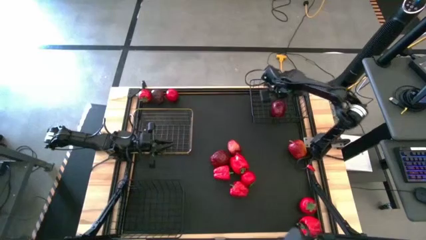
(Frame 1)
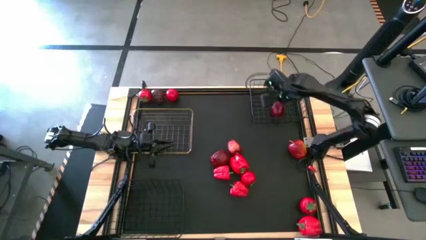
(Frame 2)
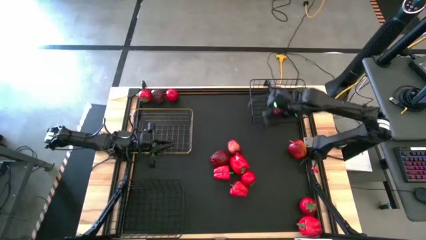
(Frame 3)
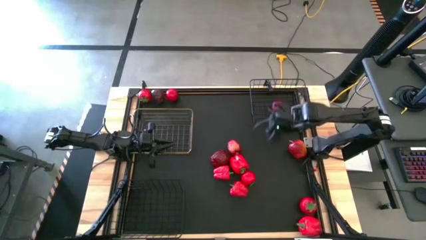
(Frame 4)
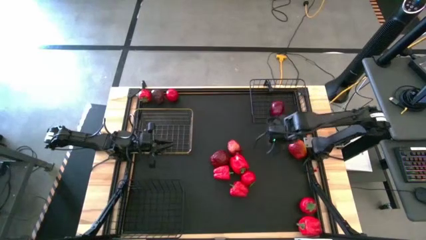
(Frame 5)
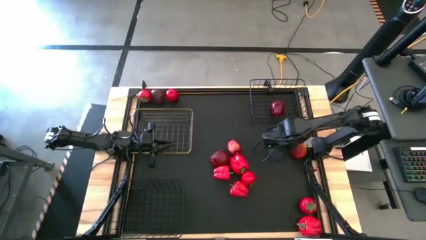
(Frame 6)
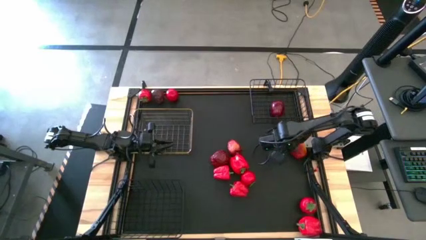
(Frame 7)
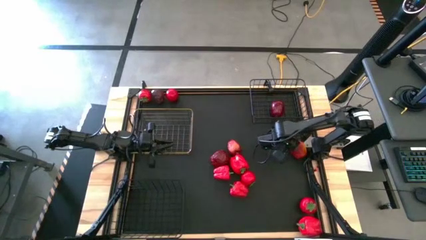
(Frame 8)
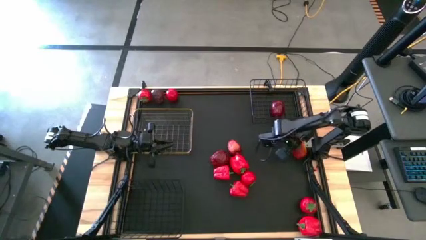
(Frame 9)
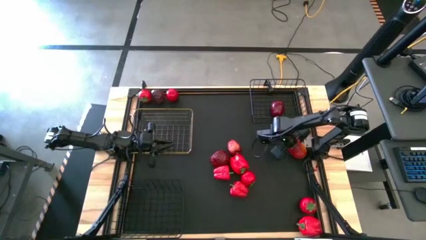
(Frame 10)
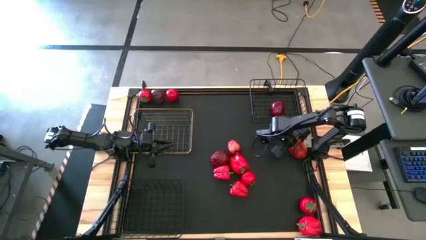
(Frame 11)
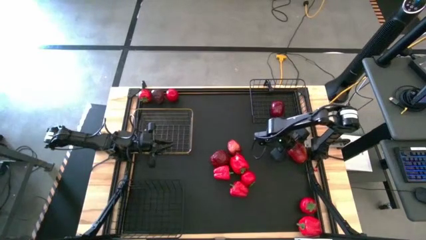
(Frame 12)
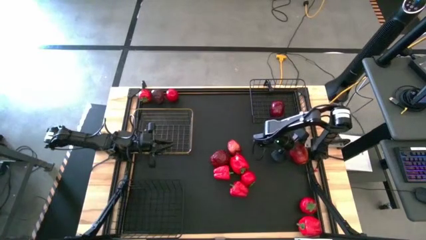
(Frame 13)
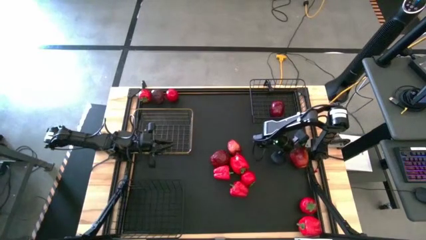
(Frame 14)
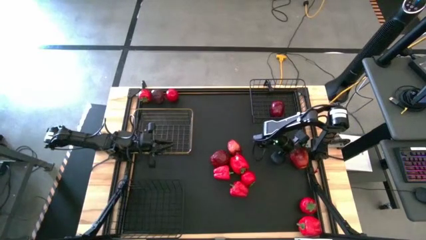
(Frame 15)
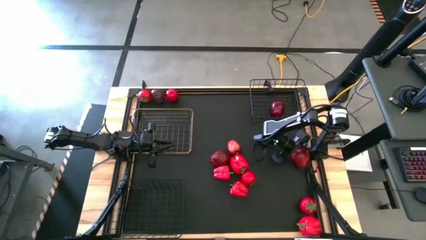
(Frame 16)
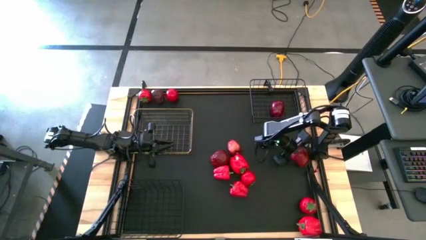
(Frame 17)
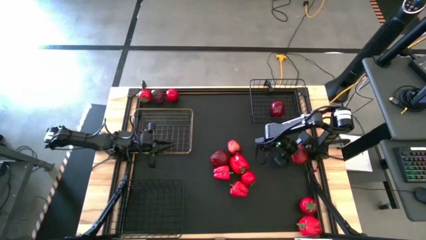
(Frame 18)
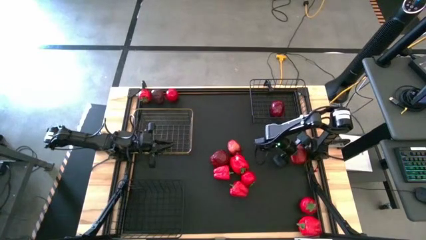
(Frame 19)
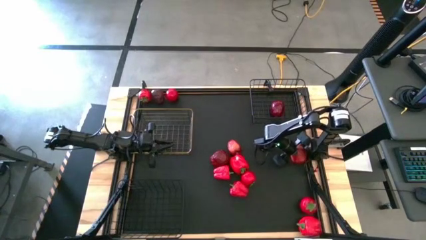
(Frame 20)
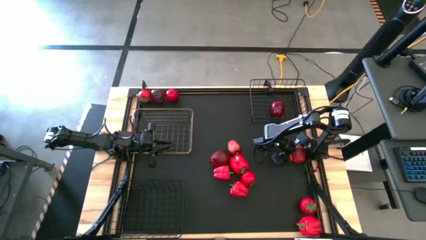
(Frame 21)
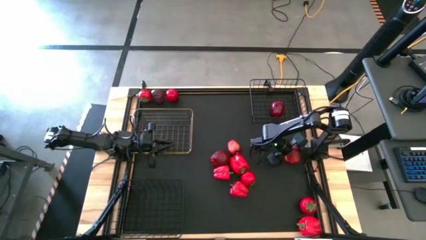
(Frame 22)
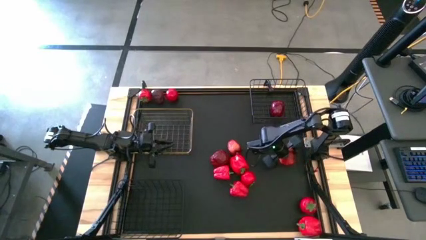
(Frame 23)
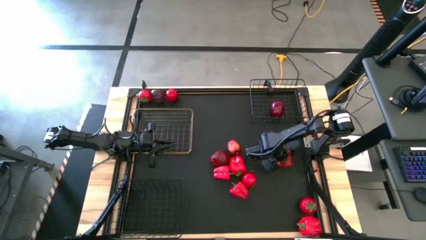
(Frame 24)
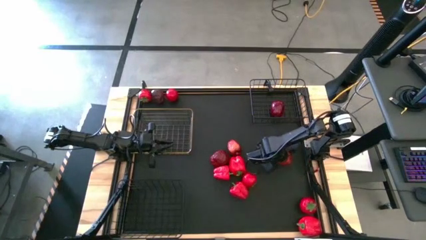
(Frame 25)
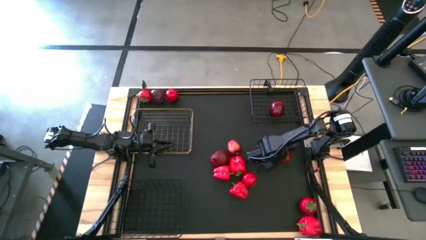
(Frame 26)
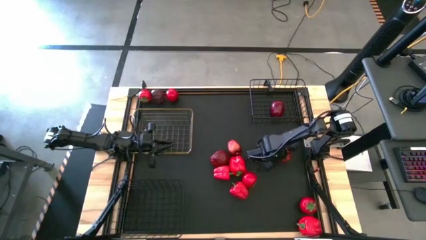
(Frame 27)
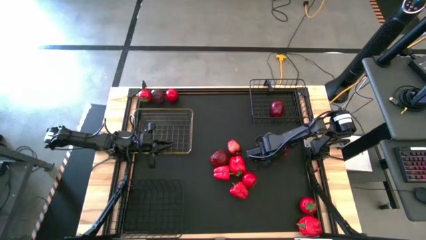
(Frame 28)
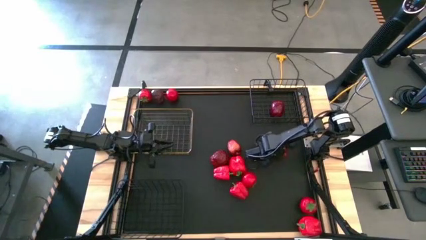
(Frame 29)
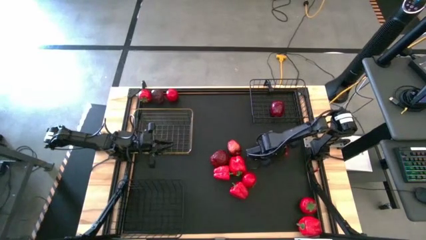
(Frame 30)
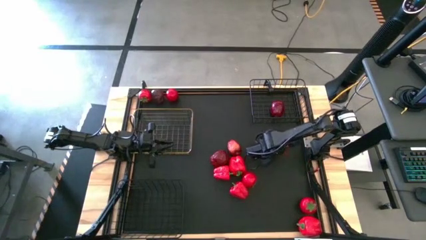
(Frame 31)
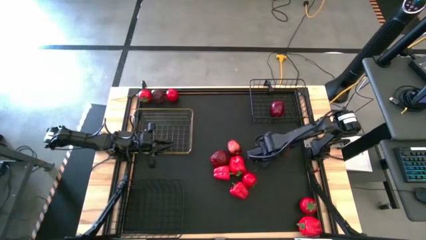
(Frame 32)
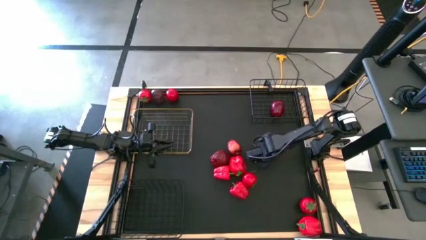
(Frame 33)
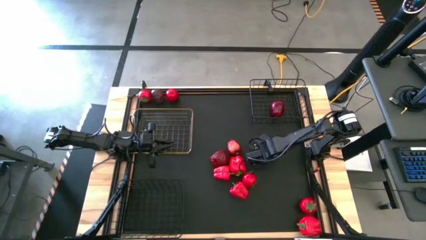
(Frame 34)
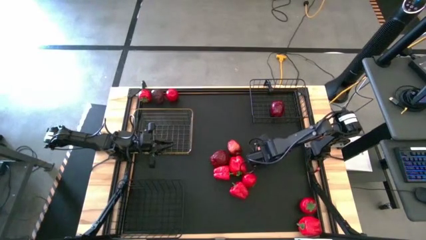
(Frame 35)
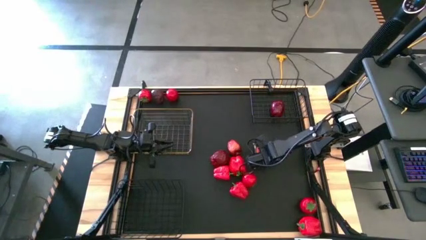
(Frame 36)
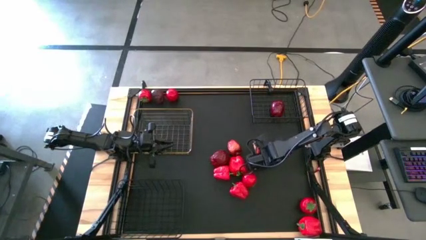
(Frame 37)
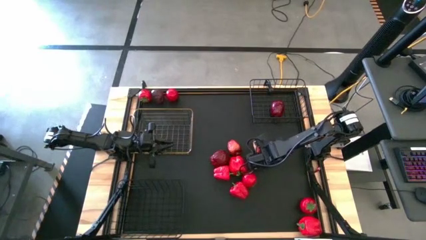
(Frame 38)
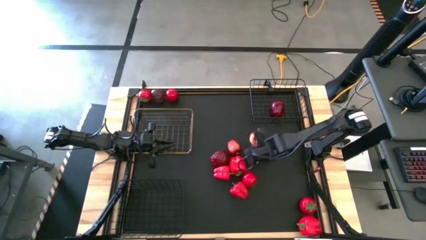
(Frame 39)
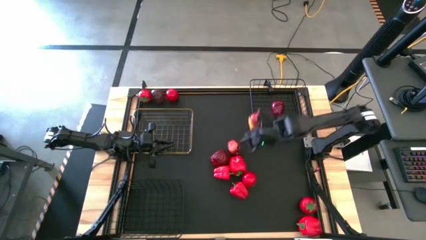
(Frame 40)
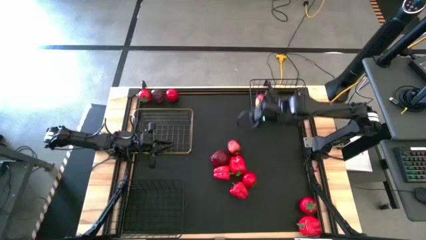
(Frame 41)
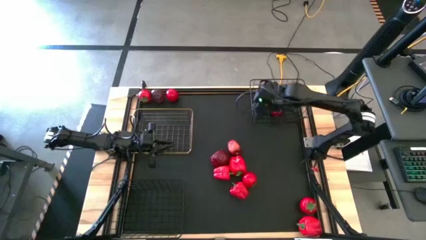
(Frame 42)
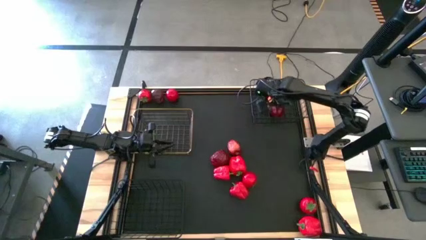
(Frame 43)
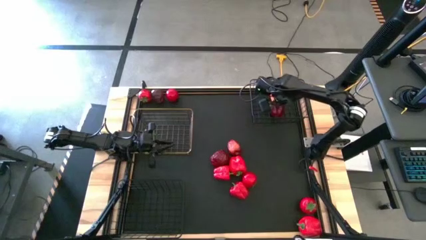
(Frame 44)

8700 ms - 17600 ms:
Task: Sort produce into baskets
Put the middle right red apple into the right black basket

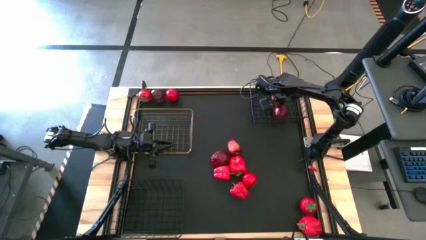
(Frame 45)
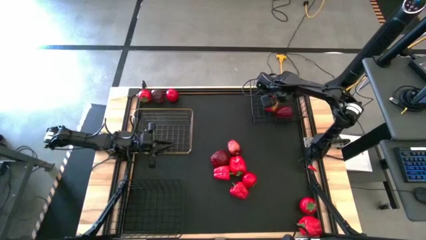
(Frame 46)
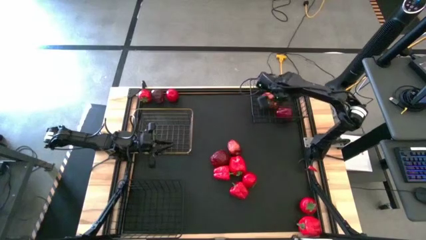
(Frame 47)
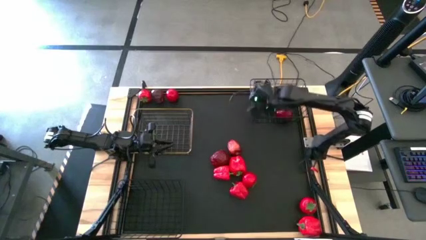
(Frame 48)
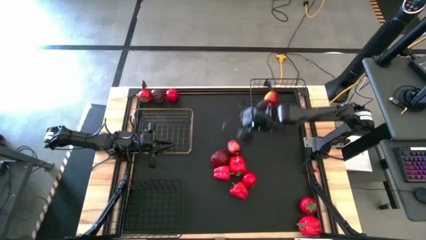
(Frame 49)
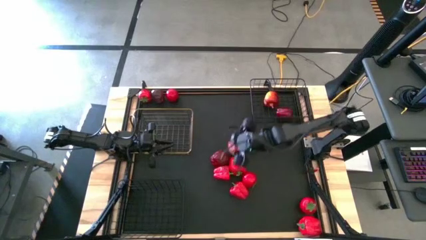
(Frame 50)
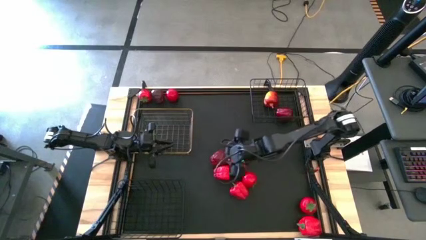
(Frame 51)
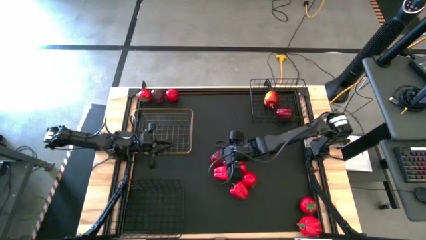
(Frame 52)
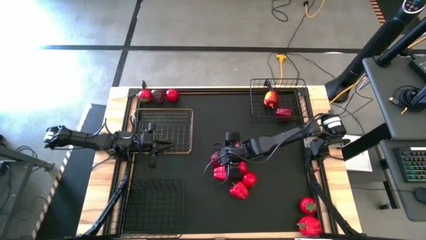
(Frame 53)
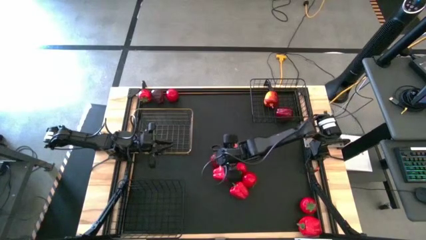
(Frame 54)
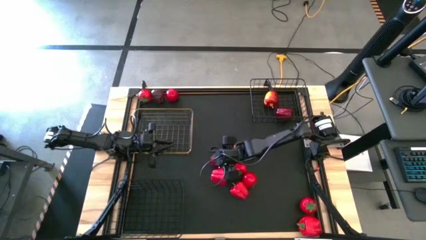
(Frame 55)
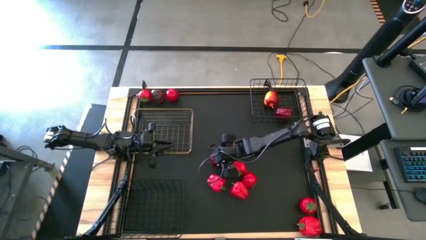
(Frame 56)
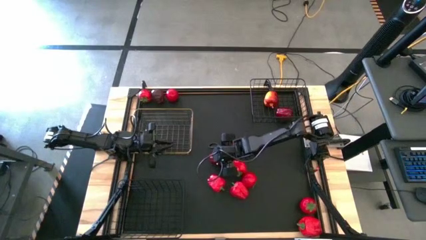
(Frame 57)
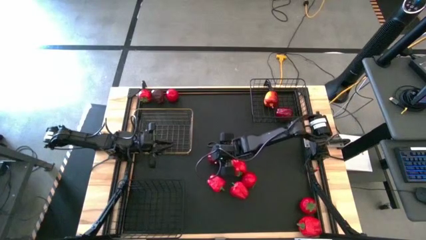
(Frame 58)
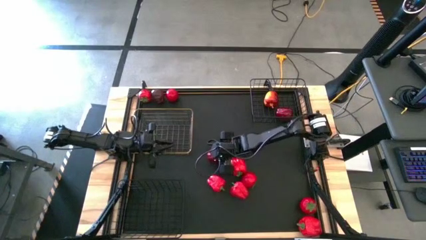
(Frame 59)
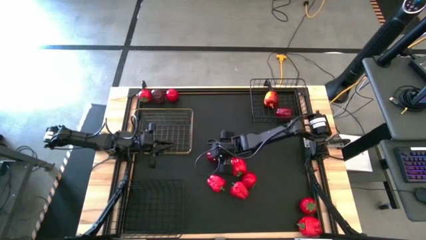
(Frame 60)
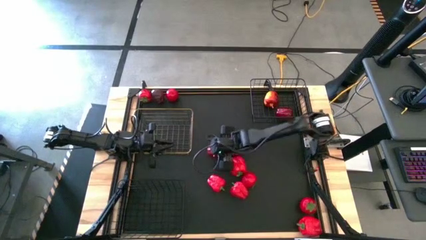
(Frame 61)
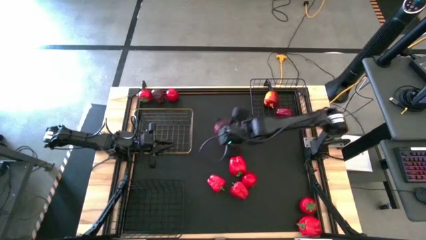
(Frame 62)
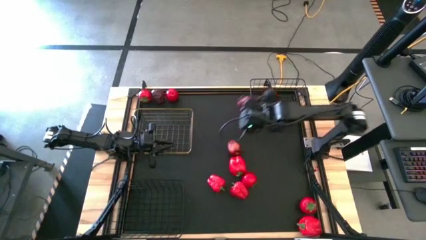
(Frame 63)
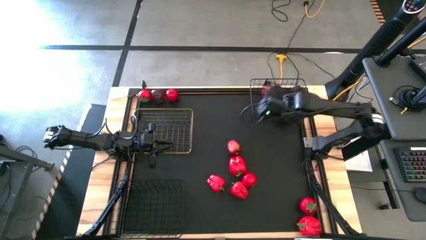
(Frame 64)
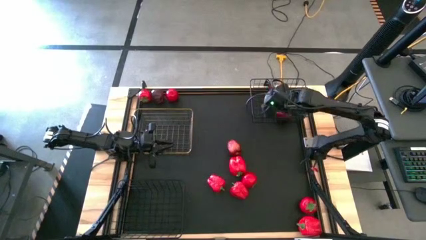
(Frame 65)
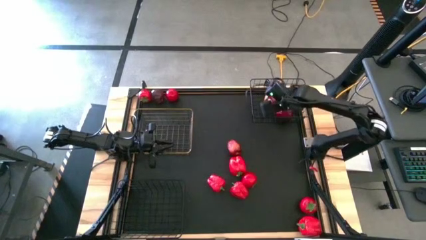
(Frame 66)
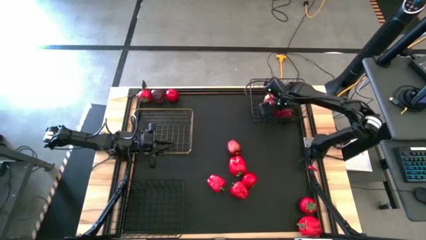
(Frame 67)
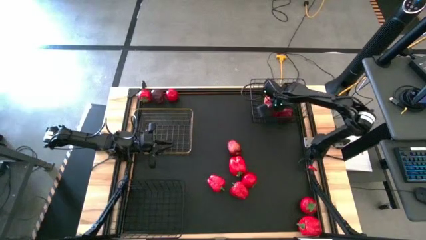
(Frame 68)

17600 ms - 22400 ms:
Put the center red apple into the right black basket

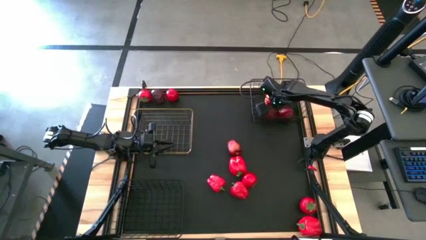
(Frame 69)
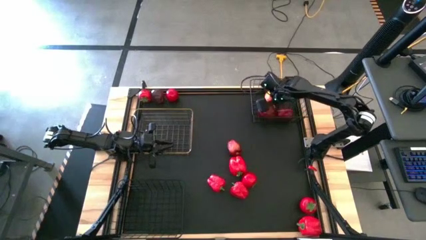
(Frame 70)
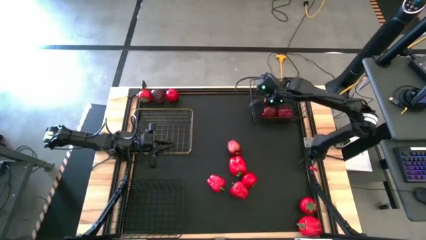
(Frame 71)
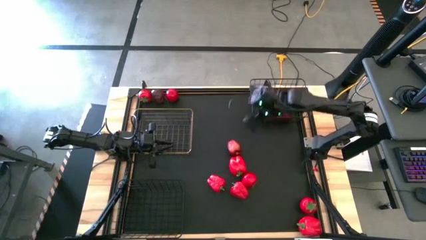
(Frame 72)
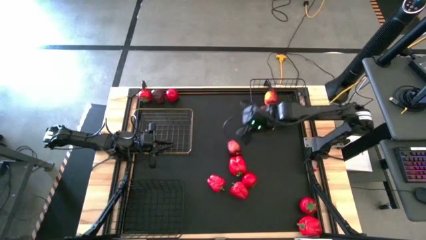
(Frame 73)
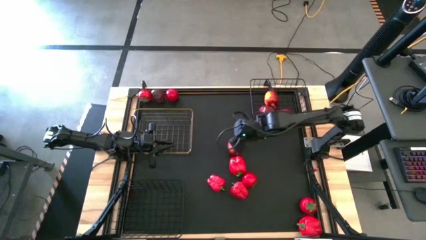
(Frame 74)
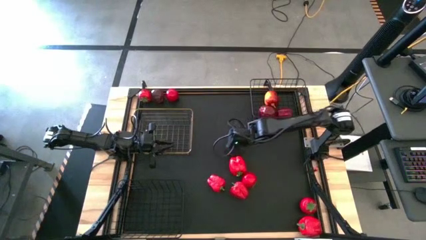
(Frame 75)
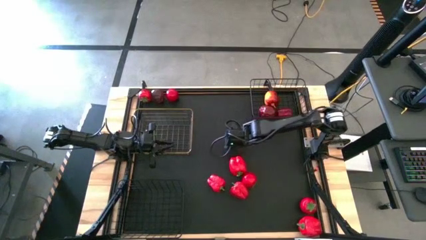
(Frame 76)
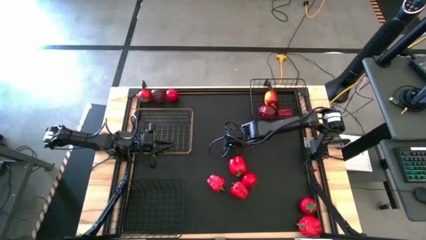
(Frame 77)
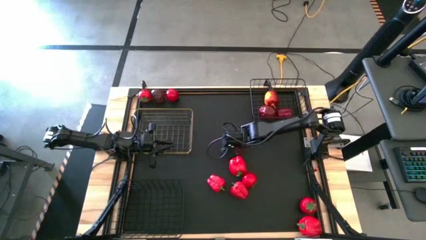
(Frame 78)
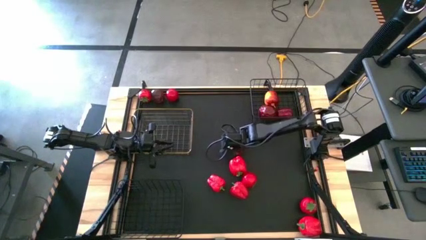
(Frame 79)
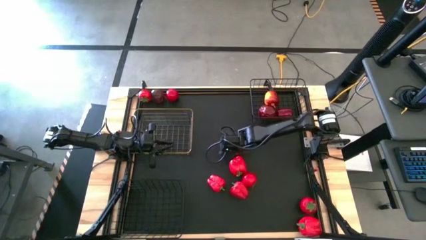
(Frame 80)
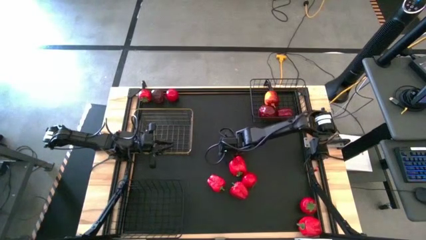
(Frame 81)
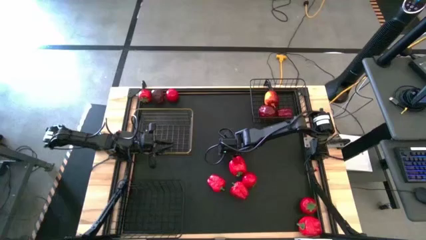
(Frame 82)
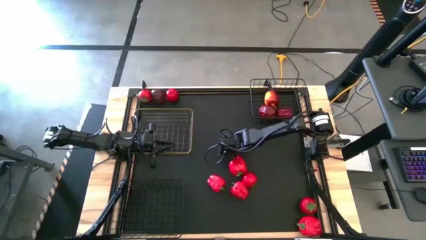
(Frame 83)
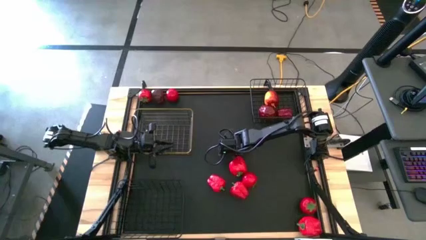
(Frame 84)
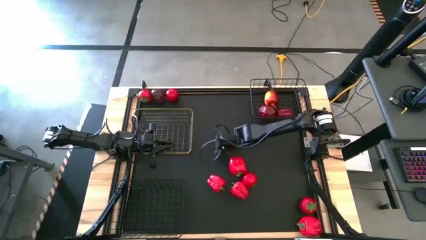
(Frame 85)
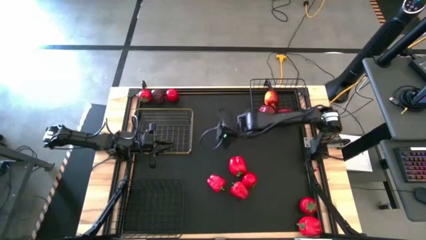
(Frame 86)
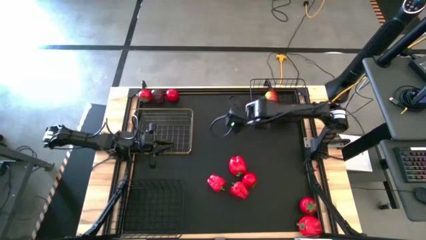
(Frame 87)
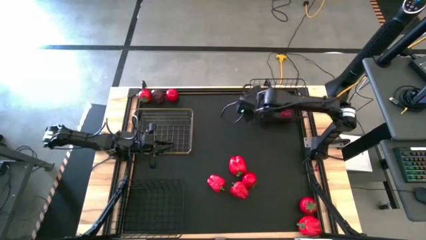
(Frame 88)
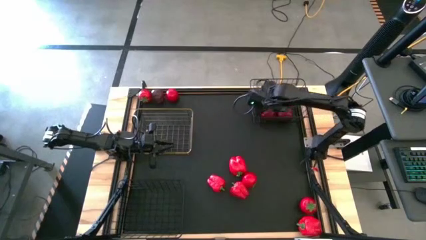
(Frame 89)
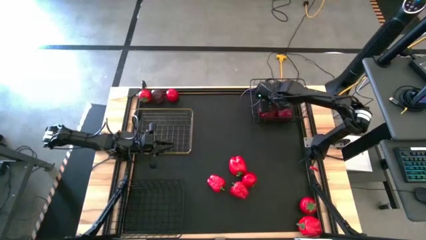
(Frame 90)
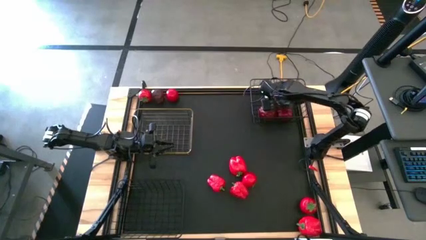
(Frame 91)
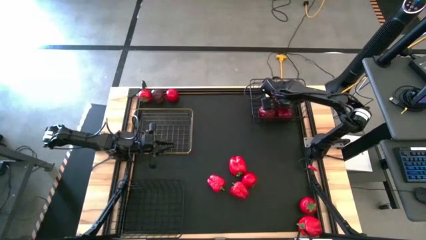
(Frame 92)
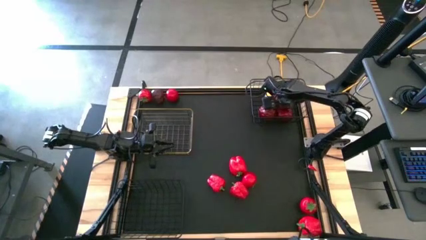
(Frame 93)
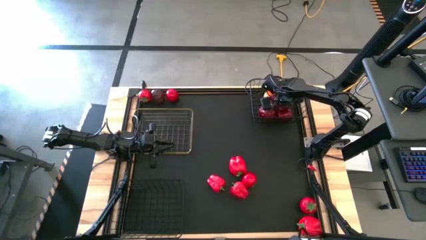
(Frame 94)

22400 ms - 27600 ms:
Put the center red apple into the right black basket
